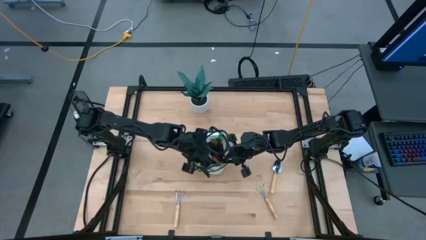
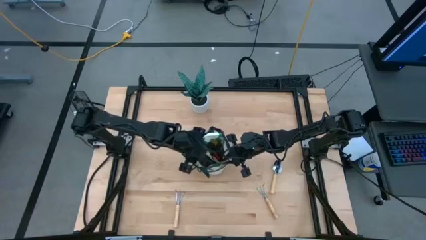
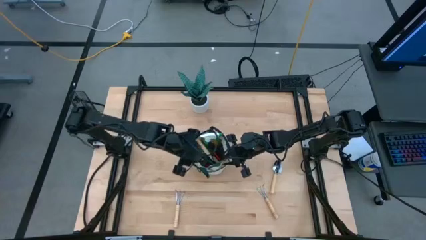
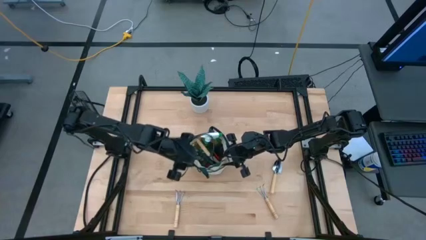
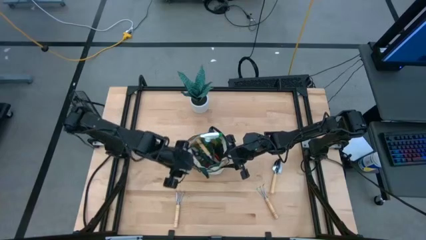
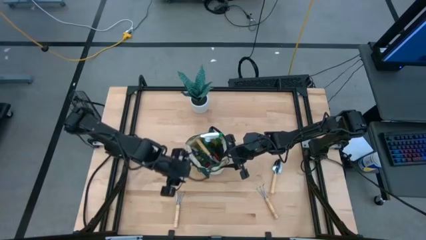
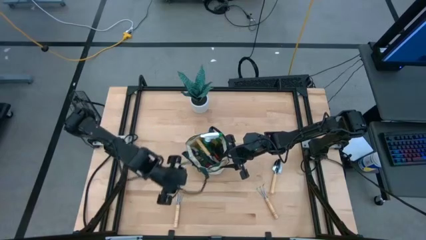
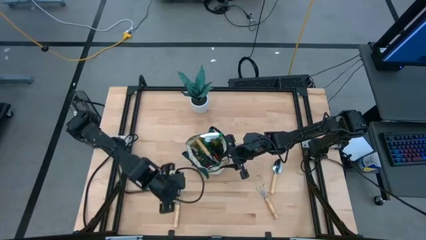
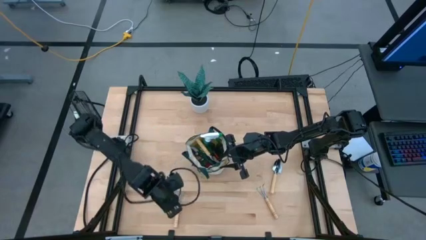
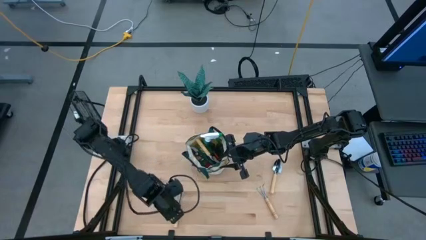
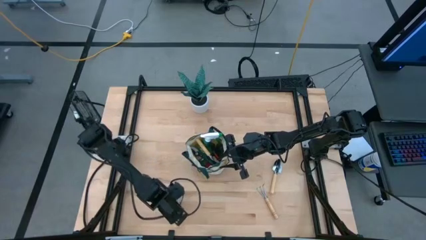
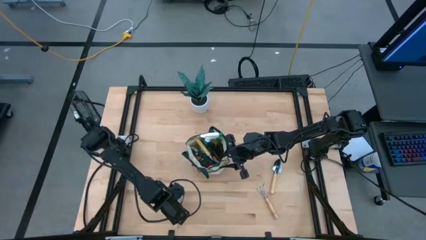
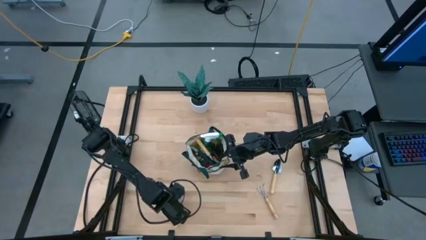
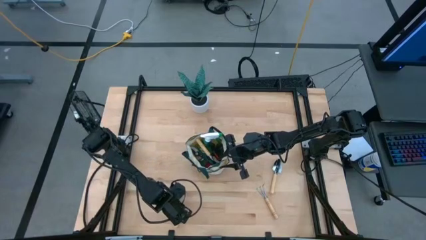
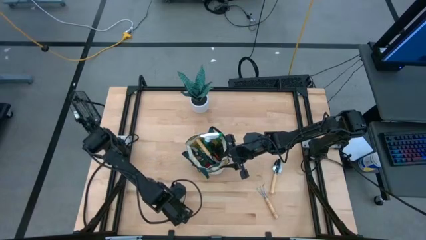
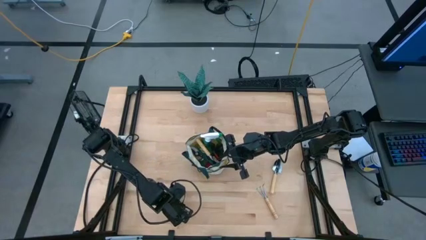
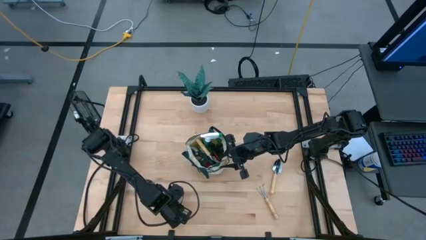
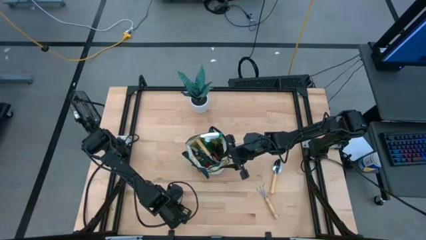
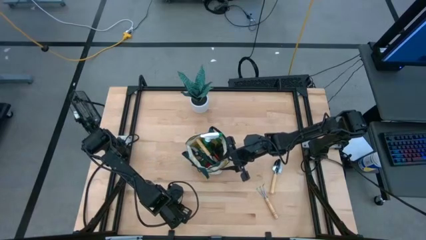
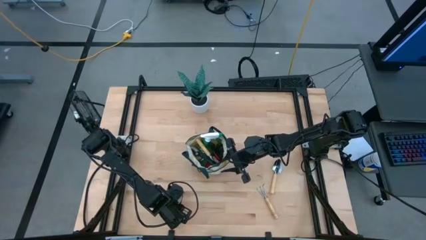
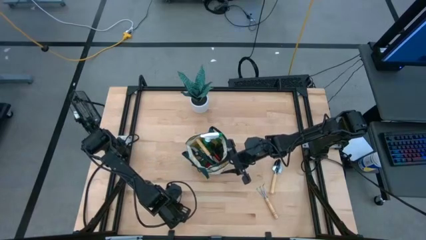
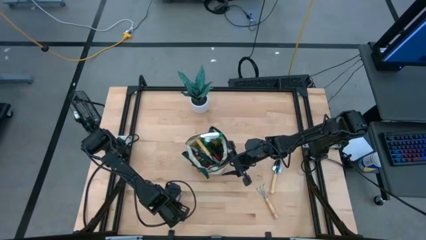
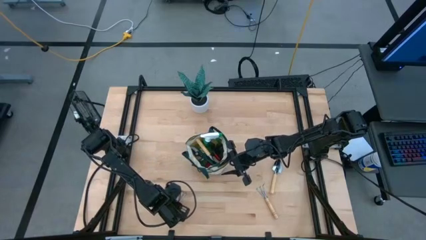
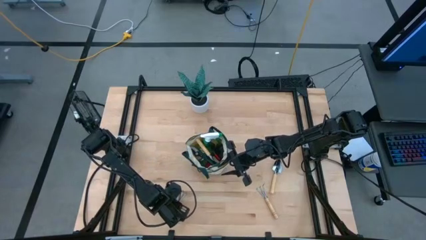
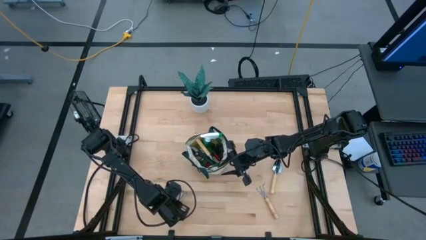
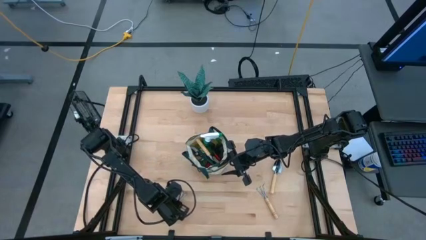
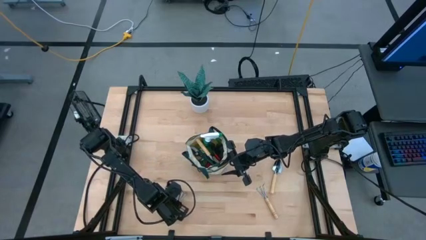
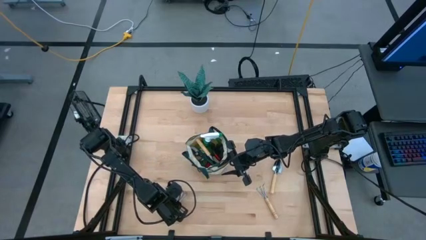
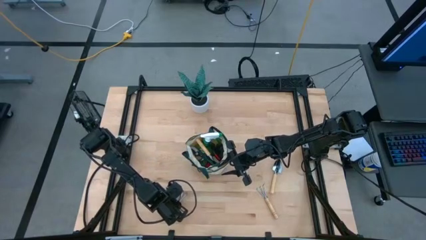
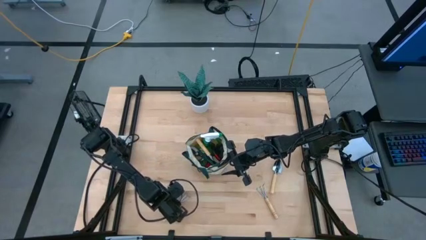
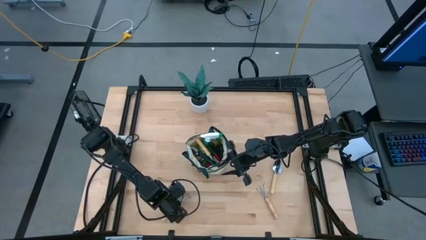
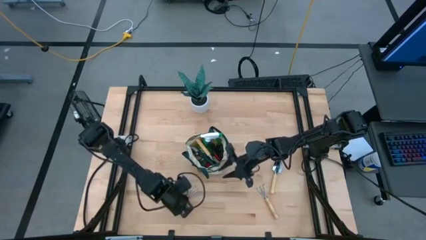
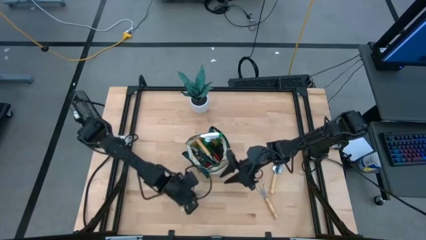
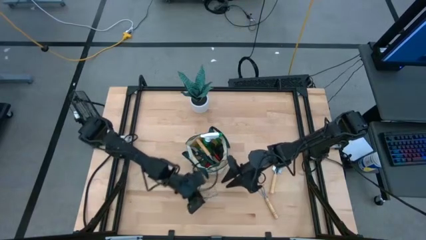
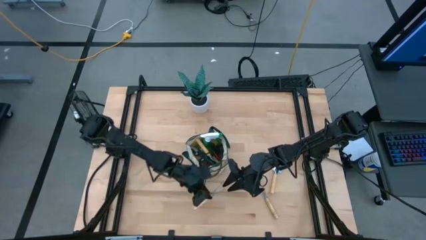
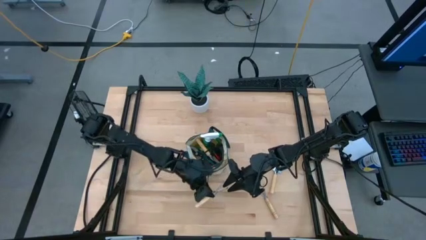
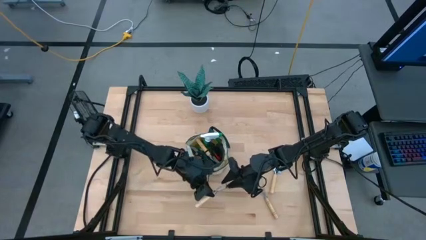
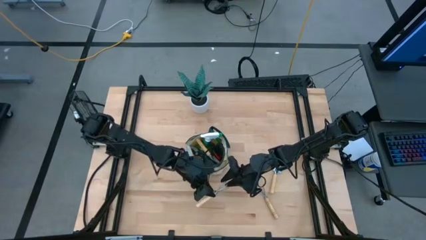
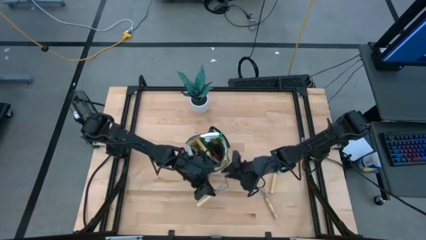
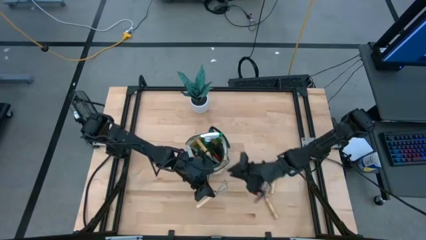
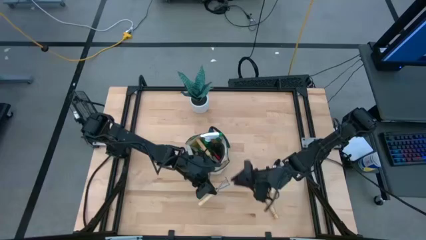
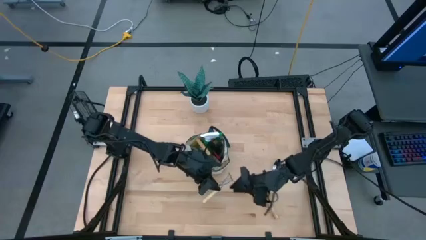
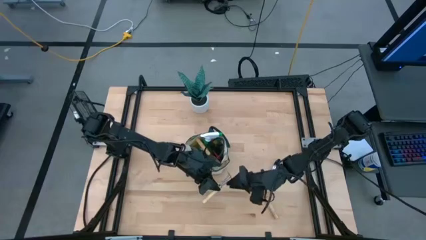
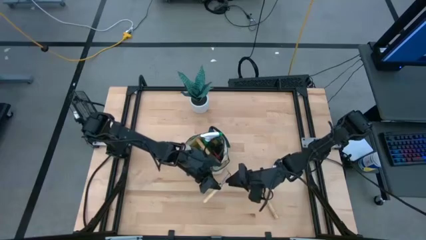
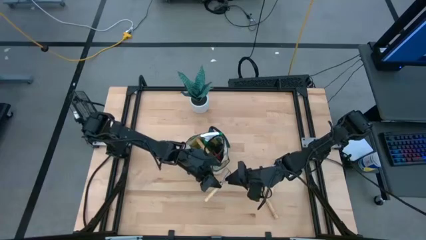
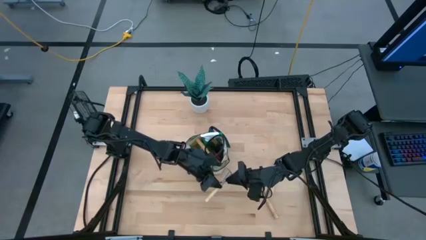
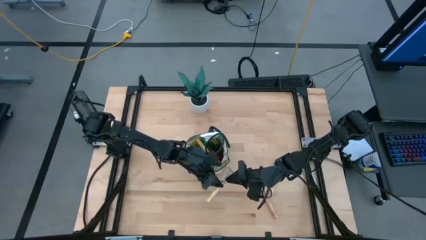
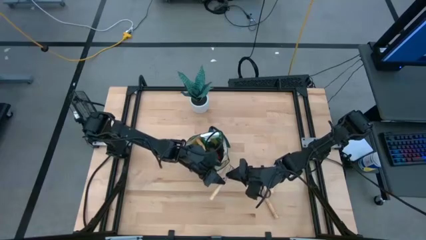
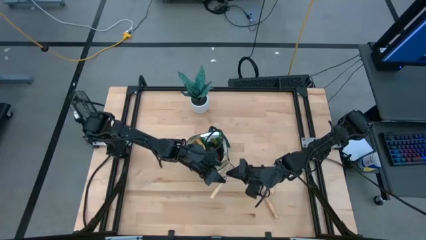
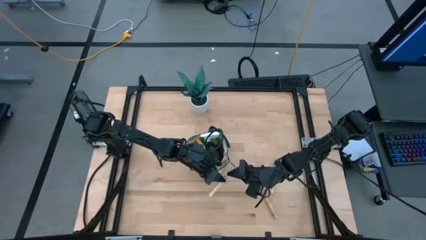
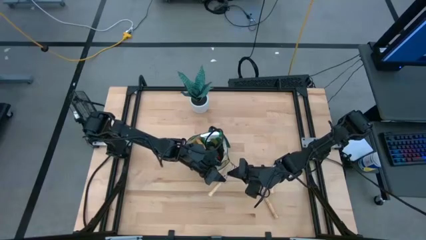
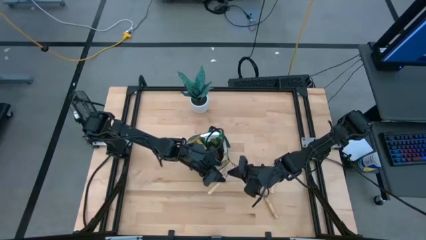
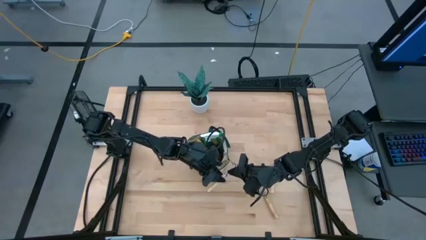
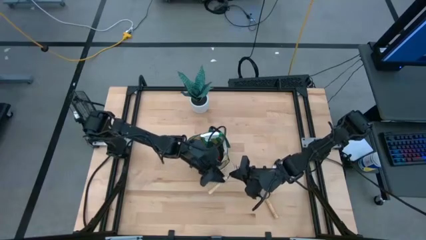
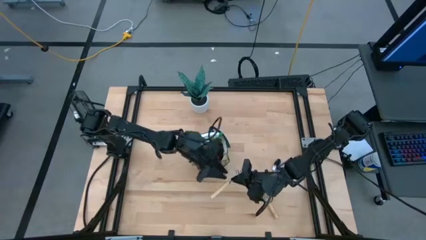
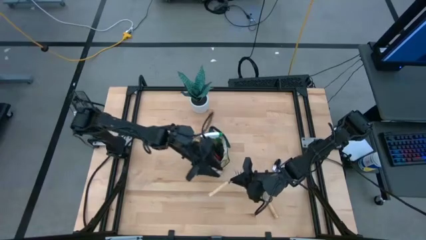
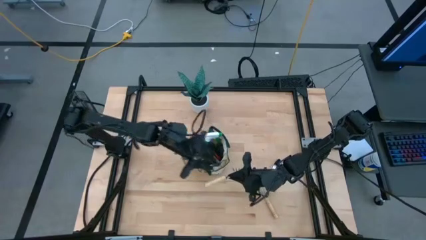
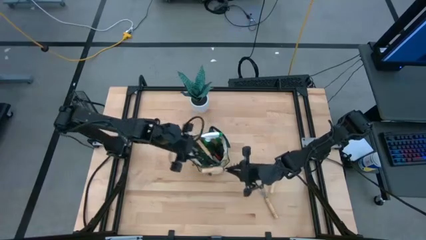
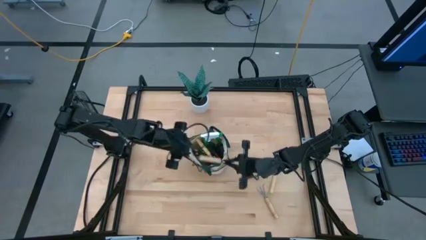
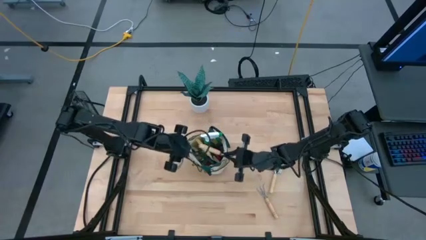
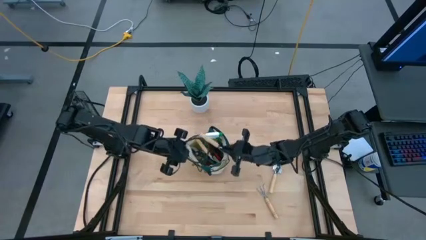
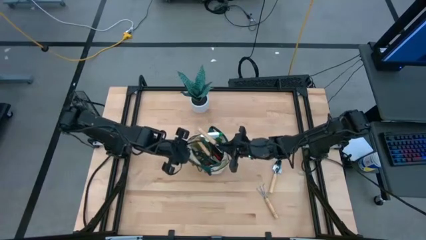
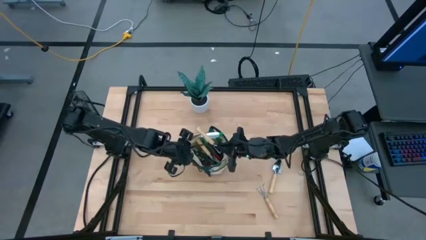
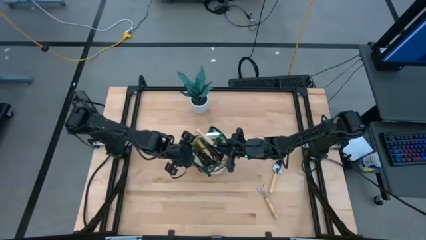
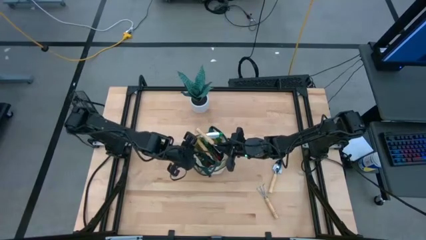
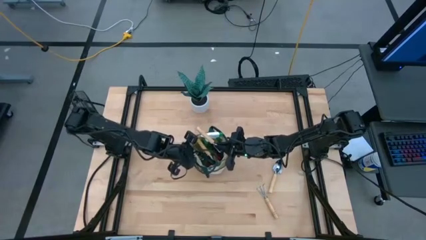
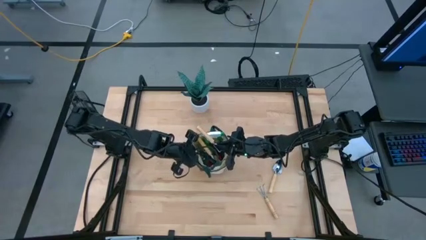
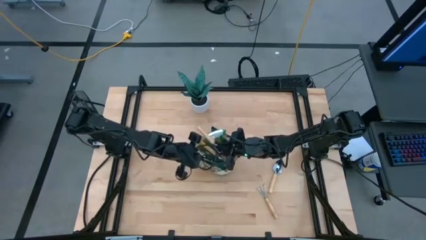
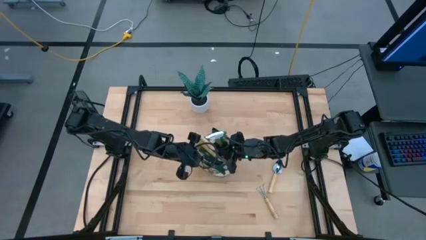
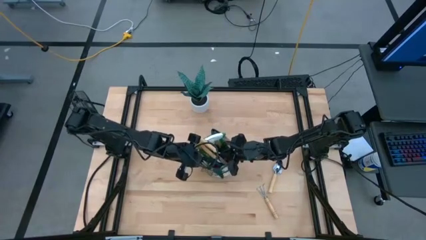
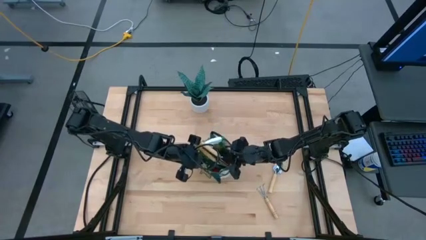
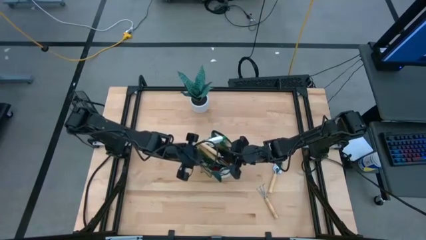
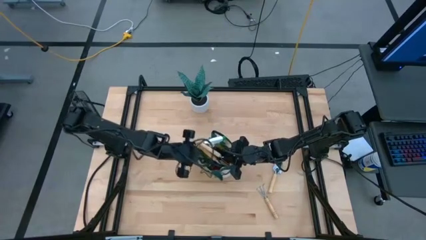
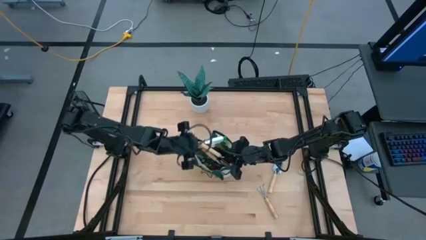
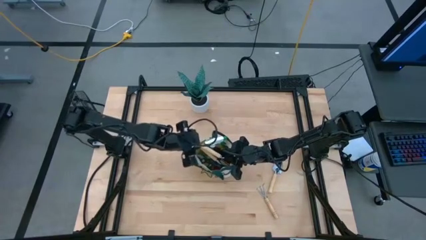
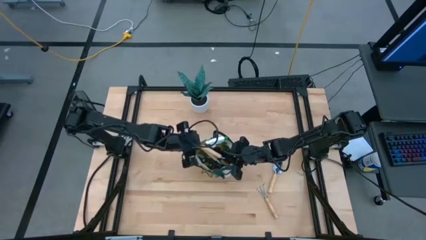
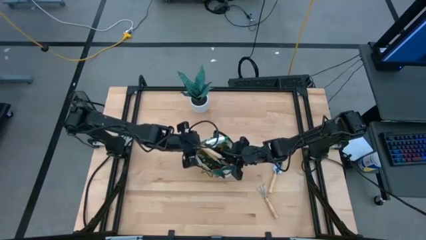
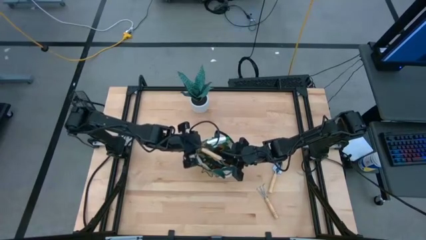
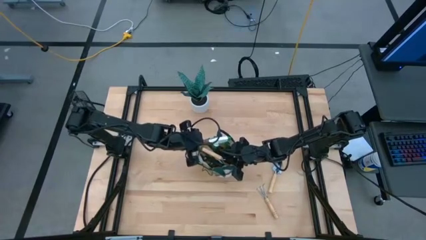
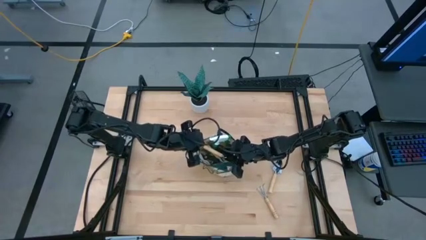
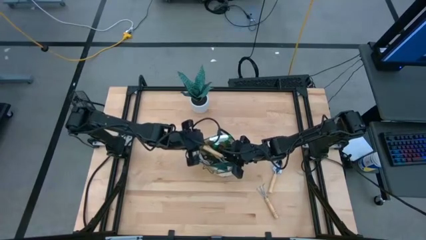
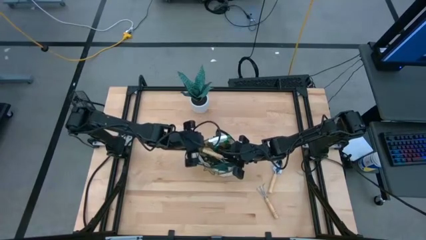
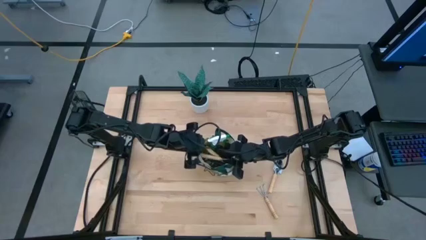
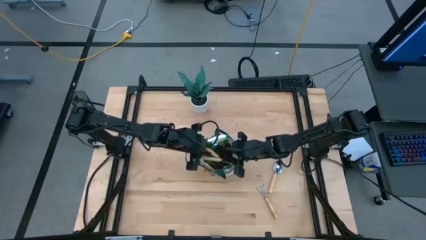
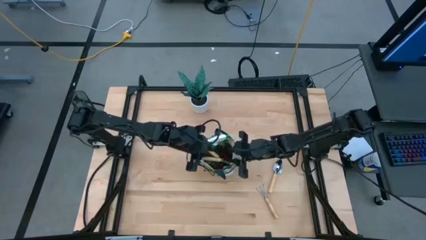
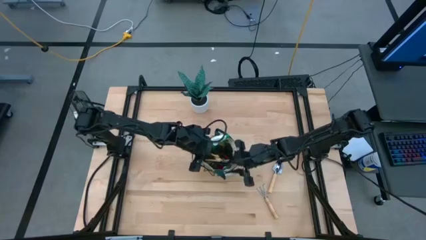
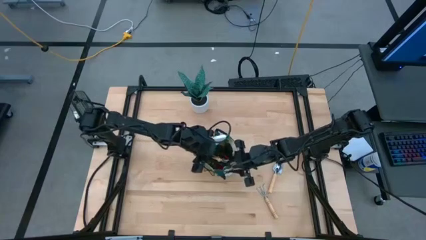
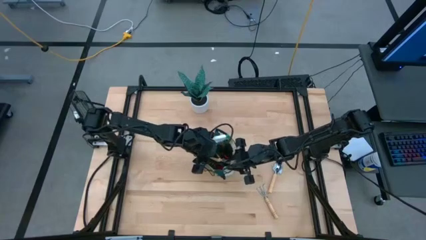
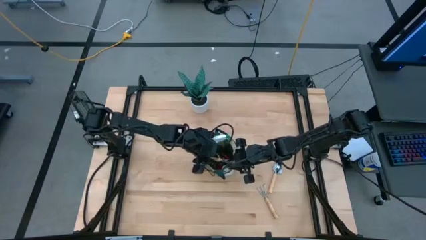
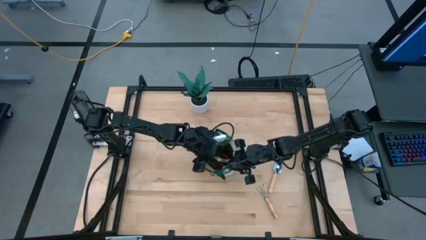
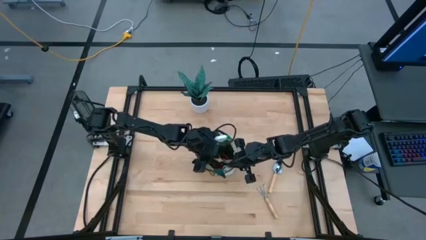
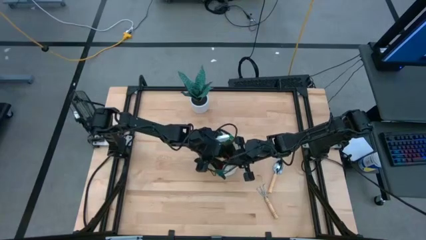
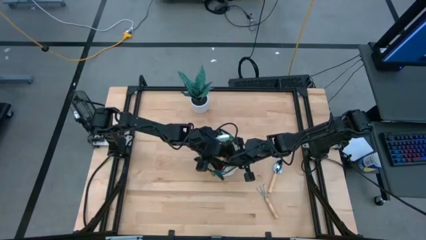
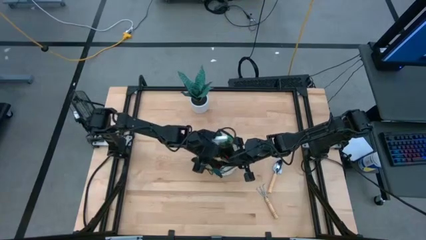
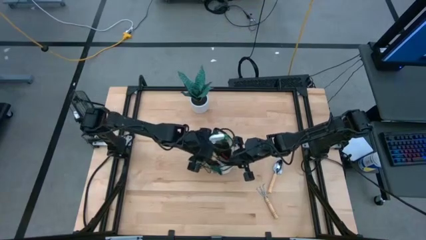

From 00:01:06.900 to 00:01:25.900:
Task: Pick & Place Garden tools in Gardening bag
Put the left brown hand rake into the gardening bag
